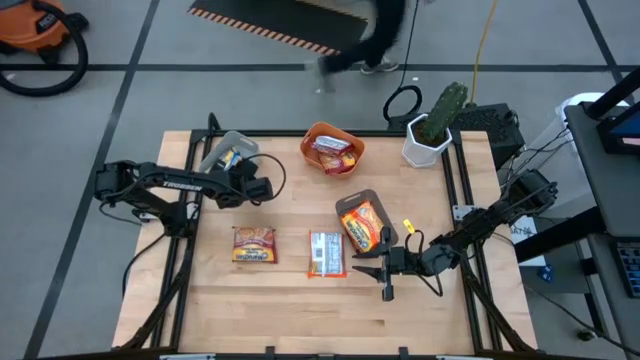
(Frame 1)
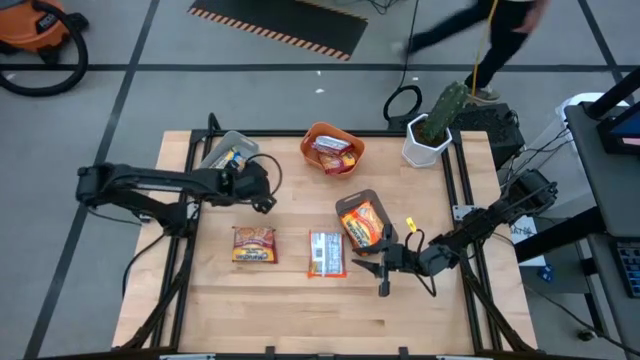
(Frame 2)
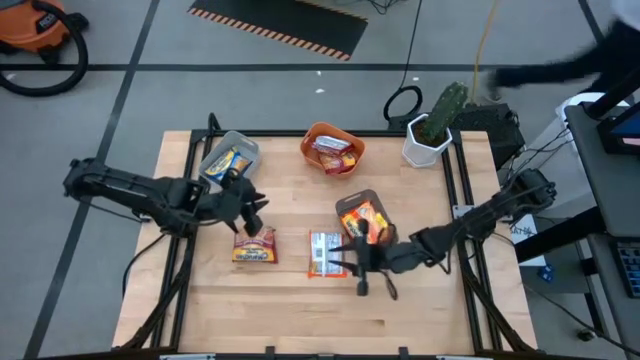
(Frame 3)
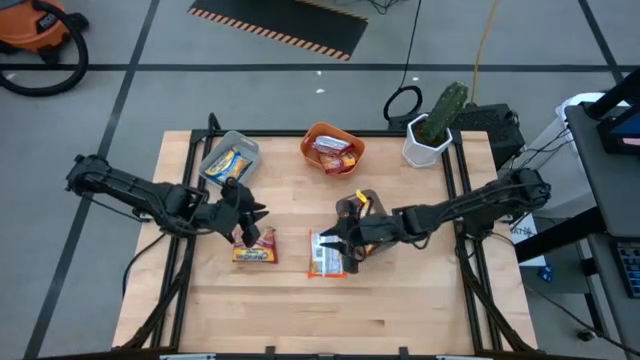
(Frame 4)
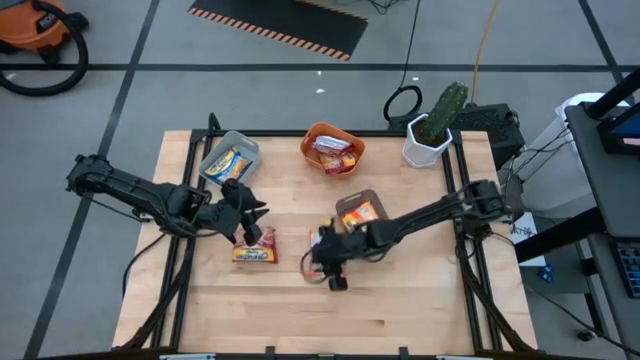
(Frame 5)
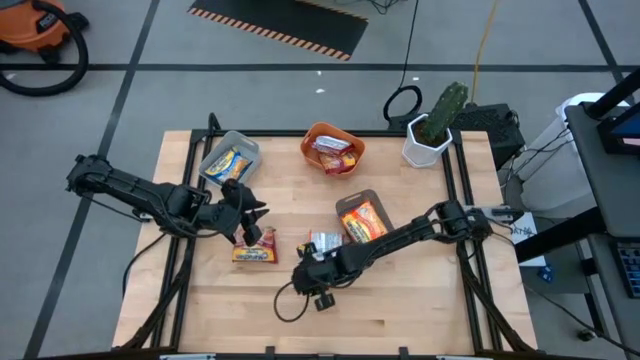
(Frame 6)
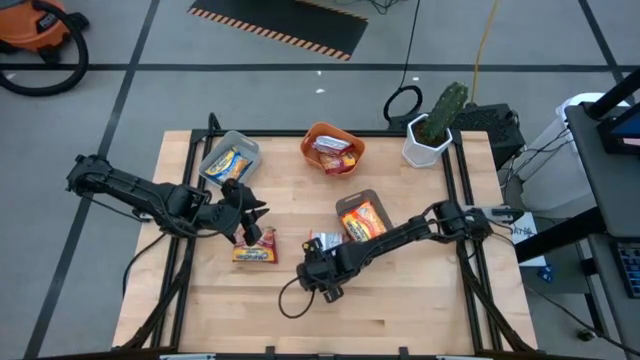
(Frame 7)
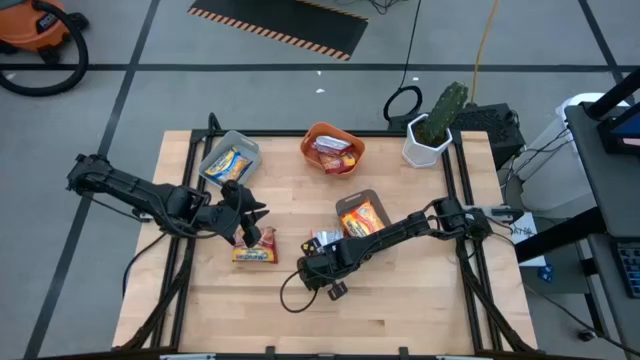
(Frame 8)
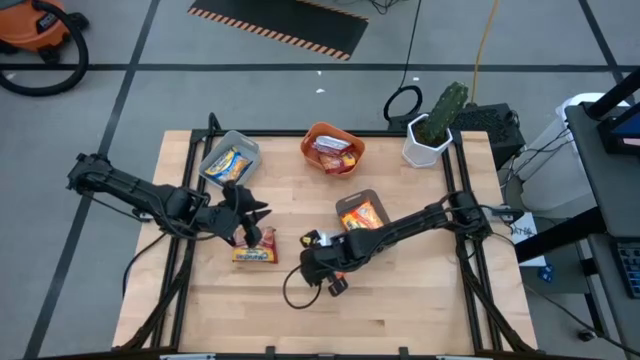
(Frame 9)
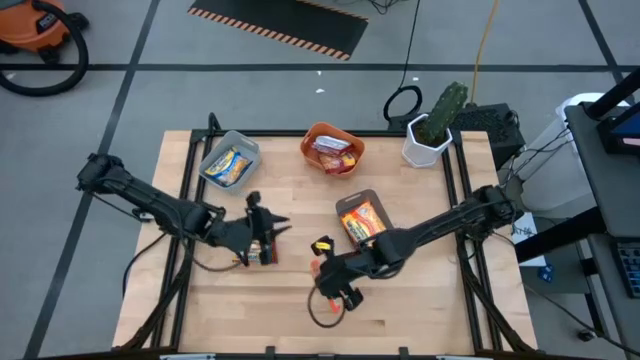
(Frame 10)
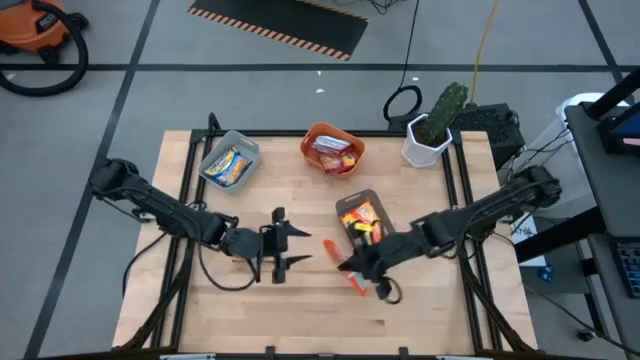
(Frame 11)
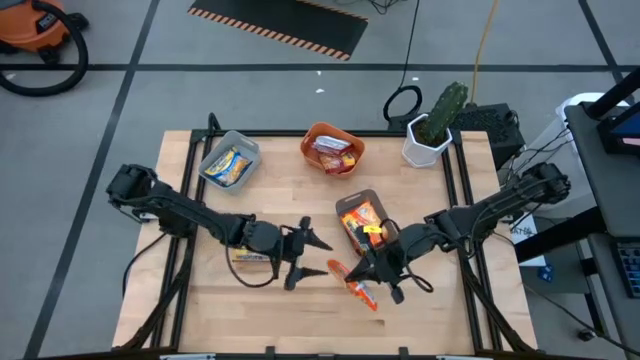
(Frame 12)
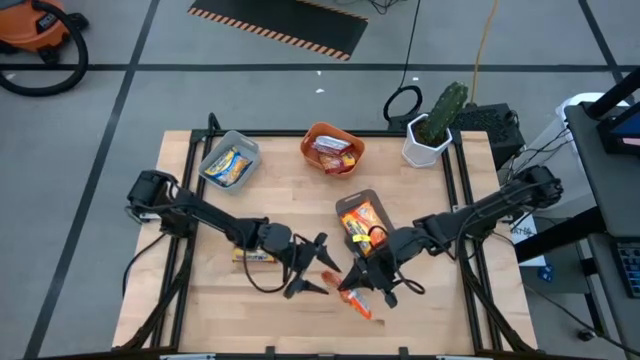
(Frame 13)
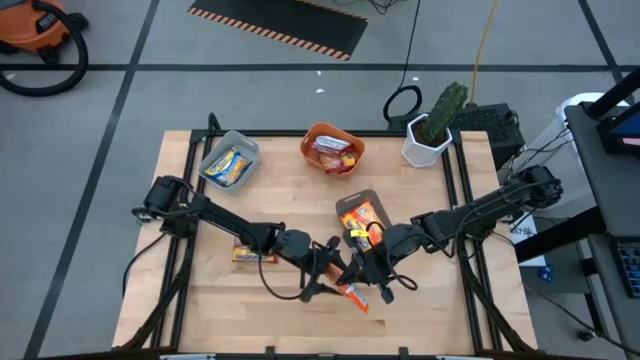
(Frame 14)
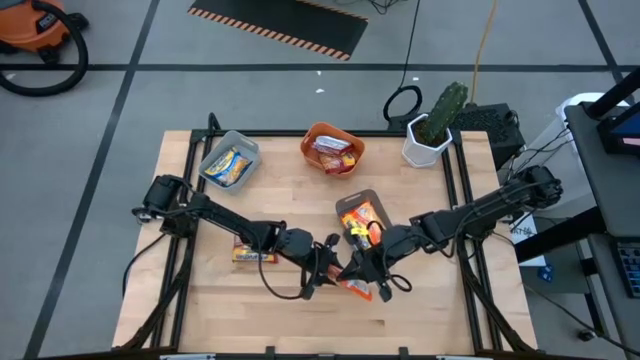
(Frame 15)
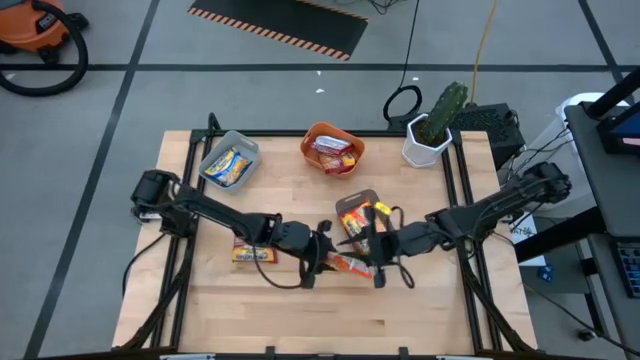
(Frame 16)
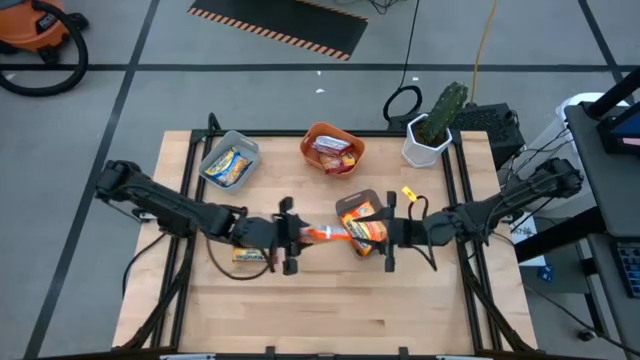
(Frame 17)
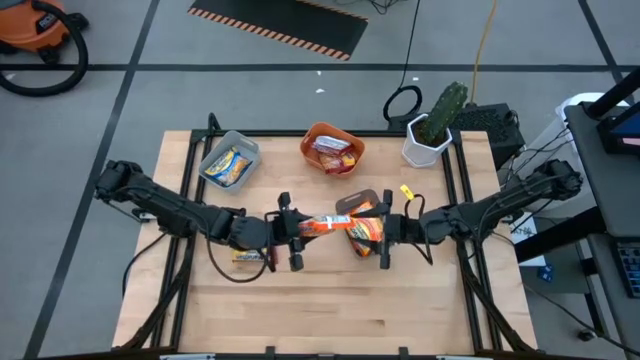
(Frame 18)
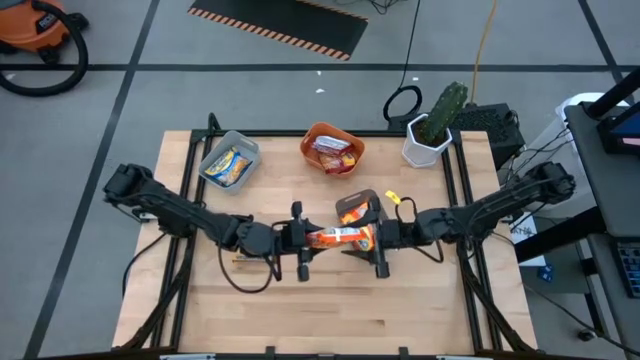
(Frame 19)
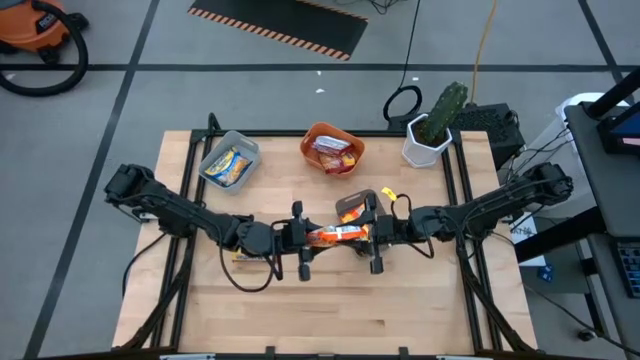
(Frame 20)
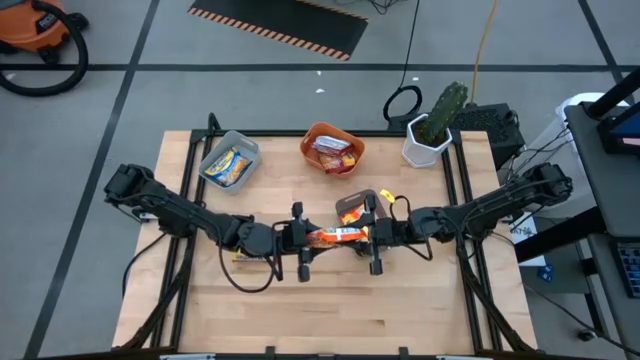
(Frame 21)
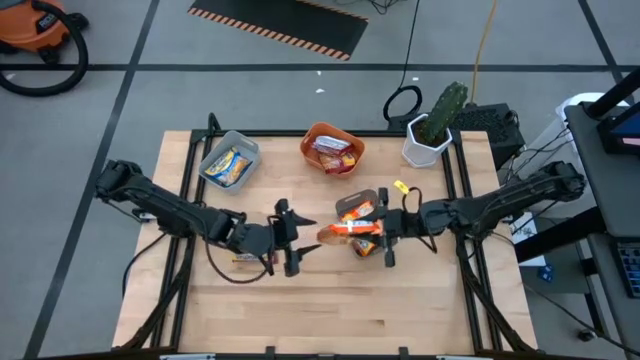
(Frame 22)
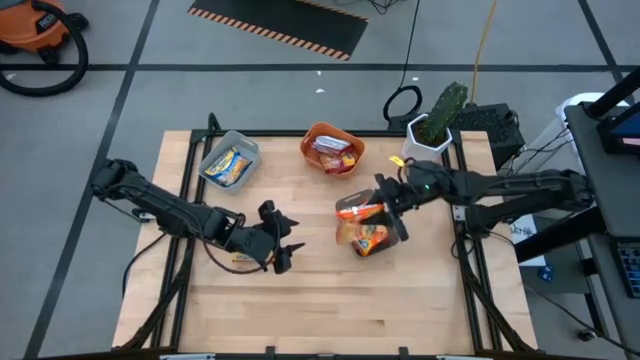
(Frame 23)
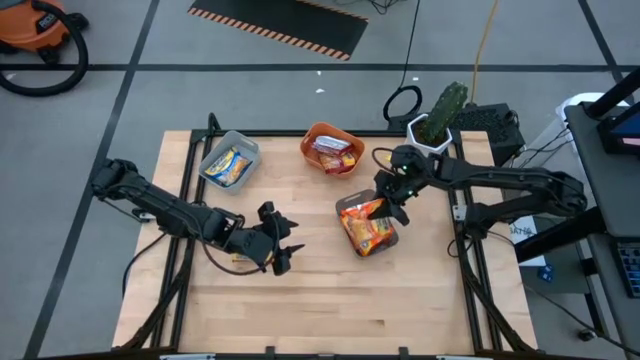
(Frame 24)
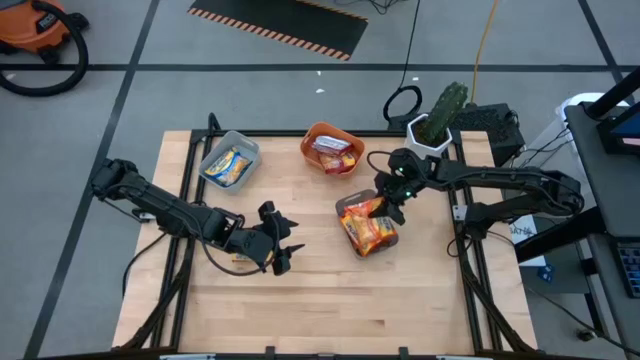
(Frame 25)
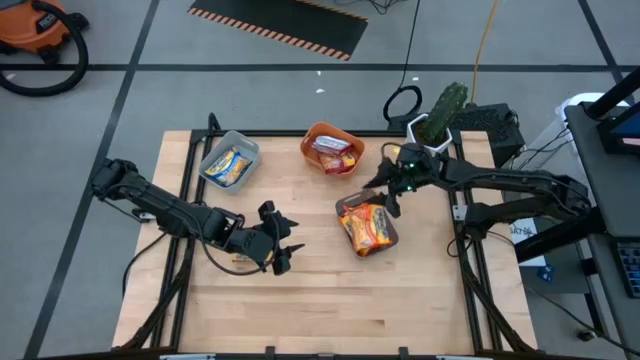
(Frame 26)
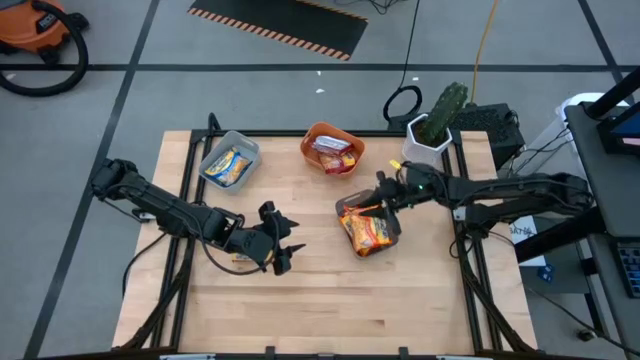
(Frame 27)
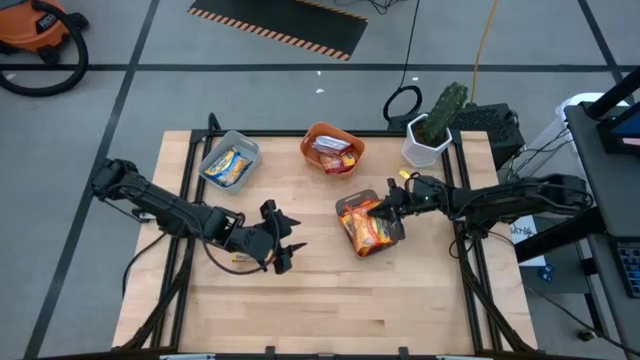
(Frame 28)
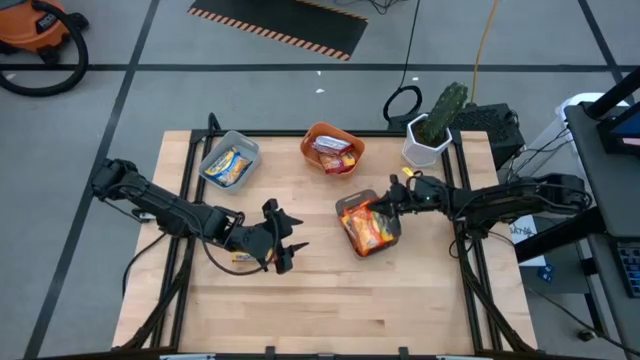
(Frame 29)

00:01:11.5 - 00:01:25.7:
Task: Sort Maruchan noodles
Put the orange noodle pack into the black bin

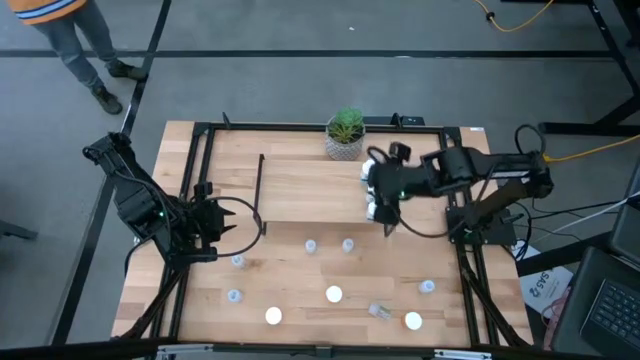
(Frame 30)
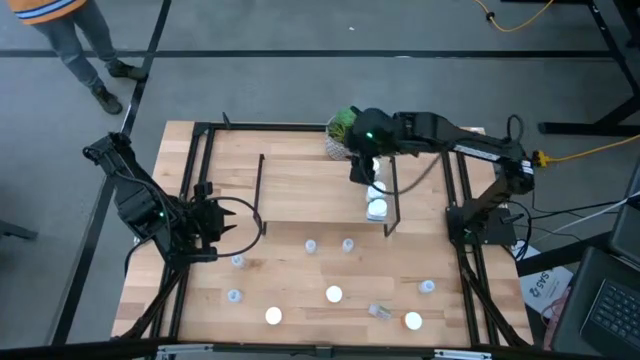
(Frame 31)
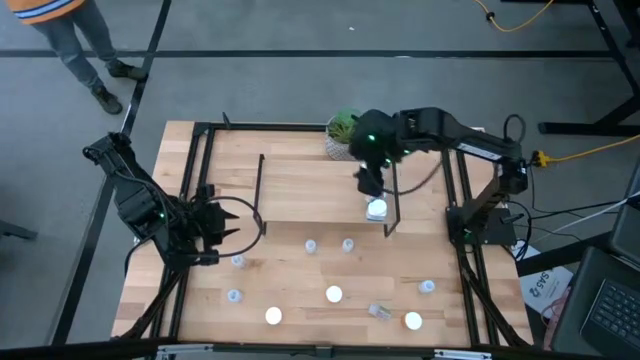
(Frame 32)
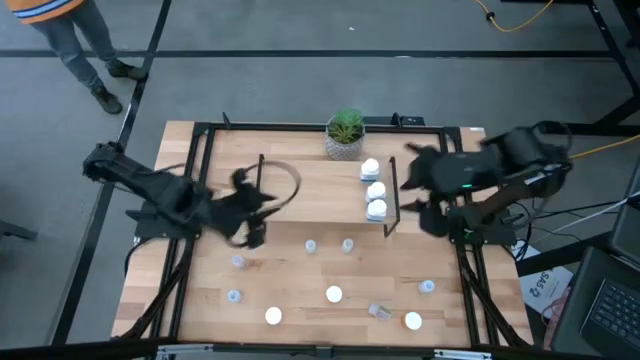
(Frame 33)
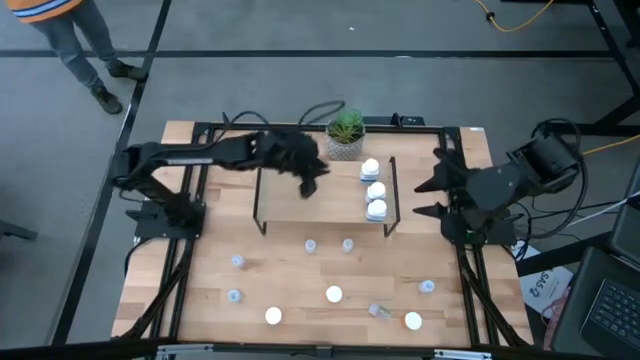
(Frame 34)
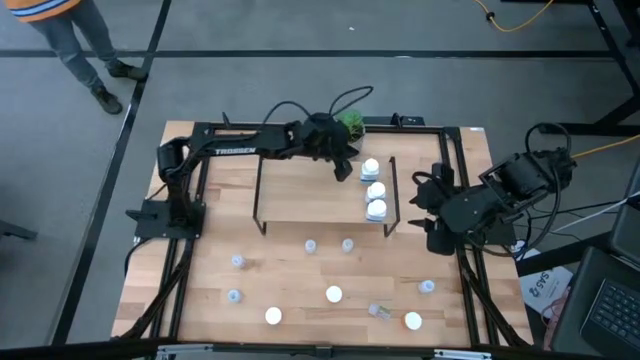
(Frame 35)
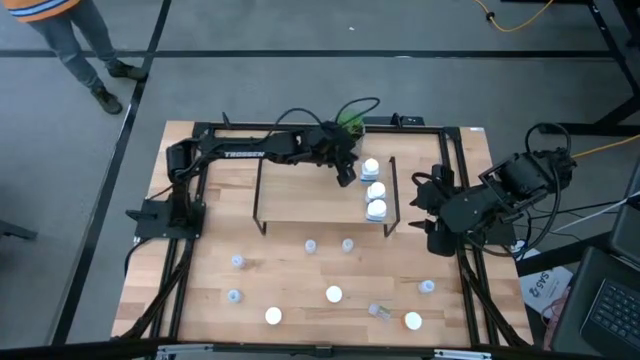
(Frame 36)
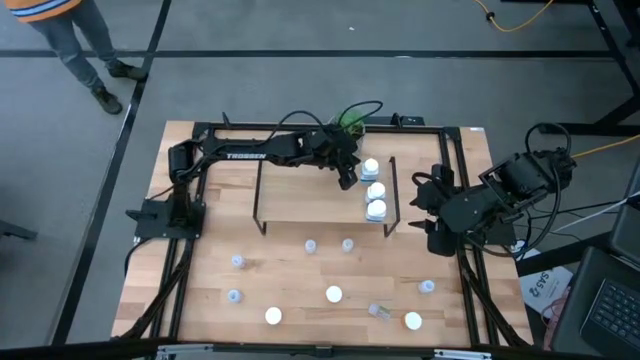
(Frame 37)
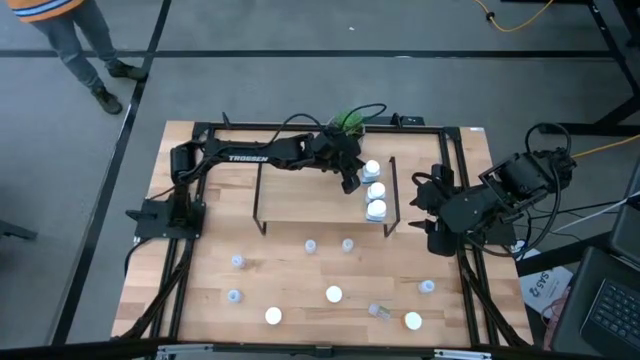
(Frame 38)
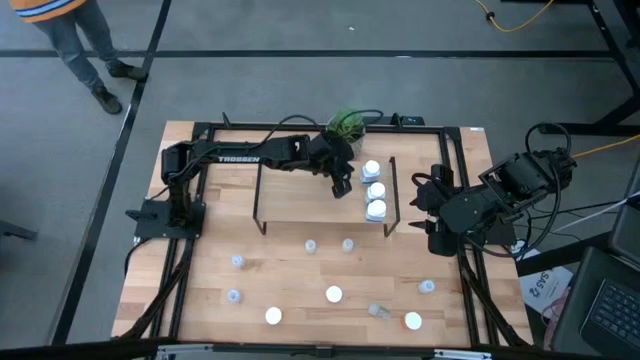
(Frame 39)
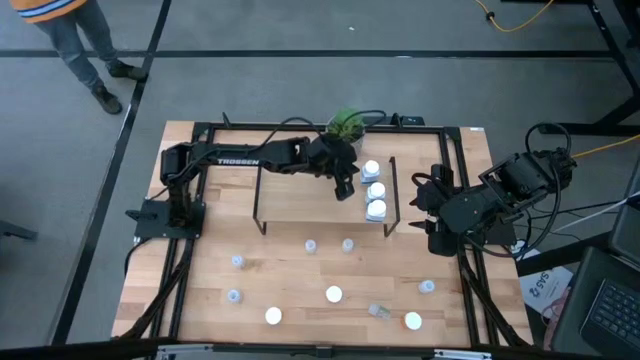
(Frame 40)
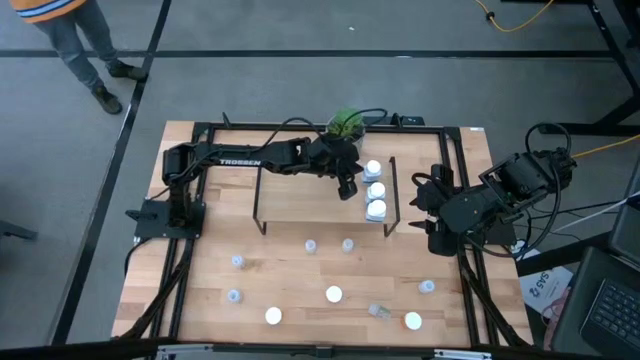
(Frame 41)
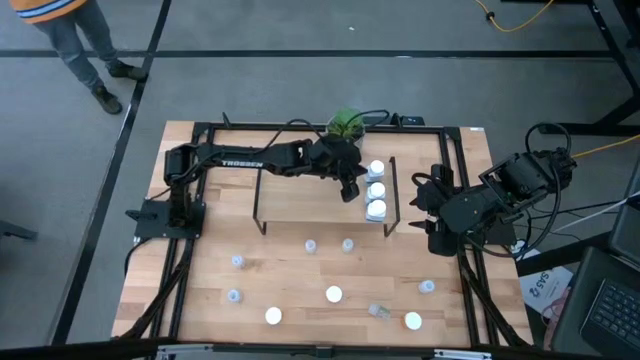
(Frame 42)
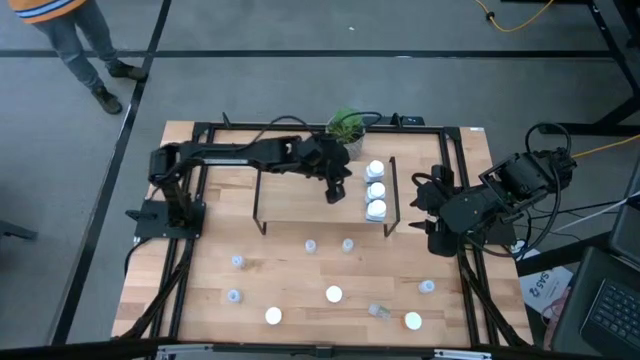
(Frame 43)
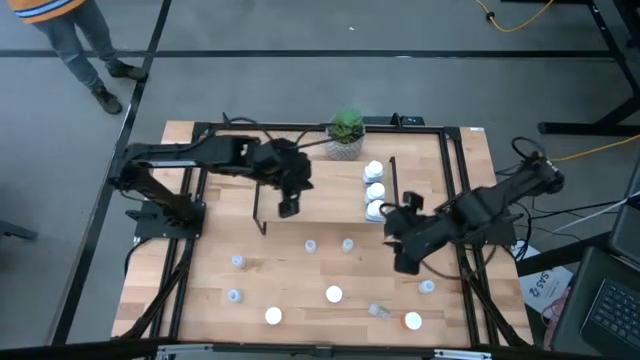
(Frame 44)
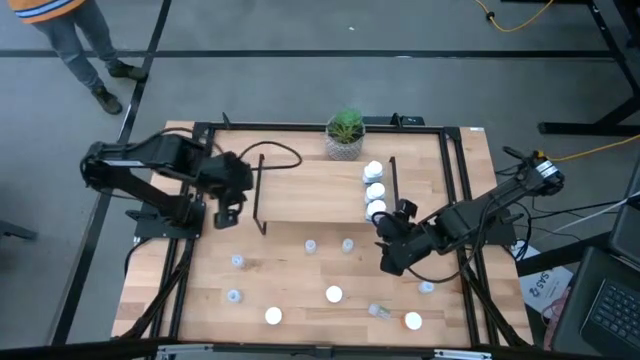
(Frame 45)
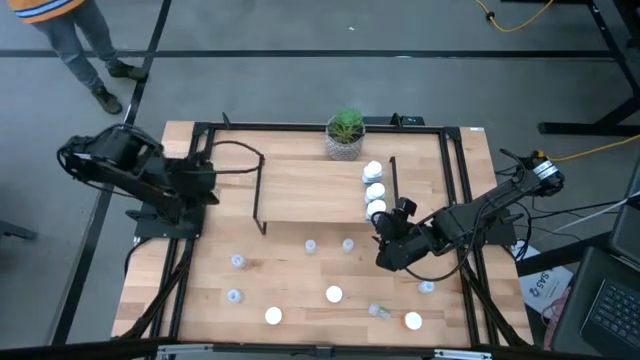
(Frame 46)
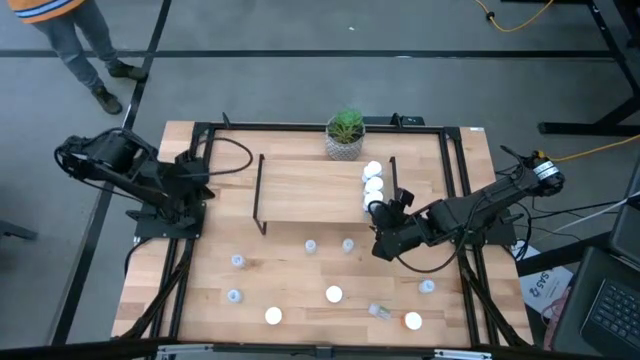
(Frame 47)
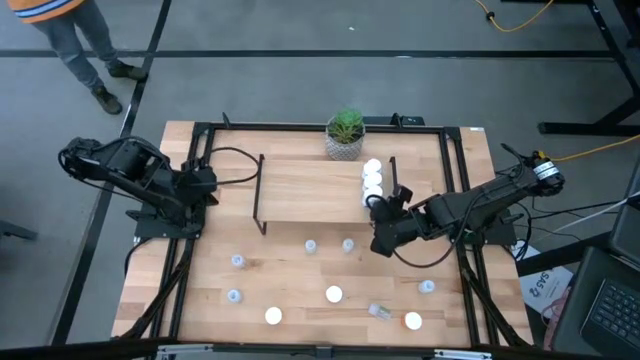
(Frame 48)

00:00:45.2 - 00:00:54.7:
Task: Pick and place medicine bottles onto shelf by color
Adjust the white medicine bottles on the shelf
